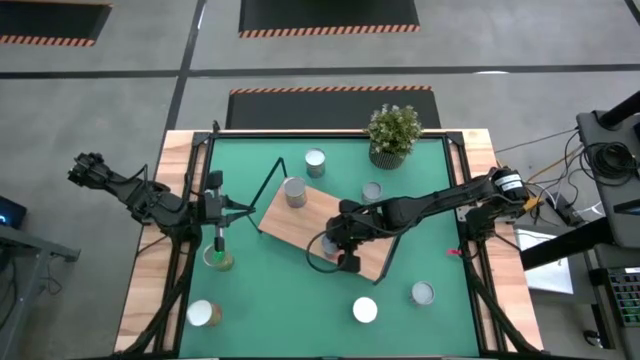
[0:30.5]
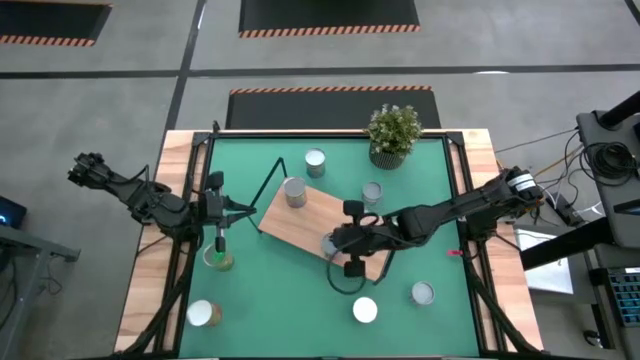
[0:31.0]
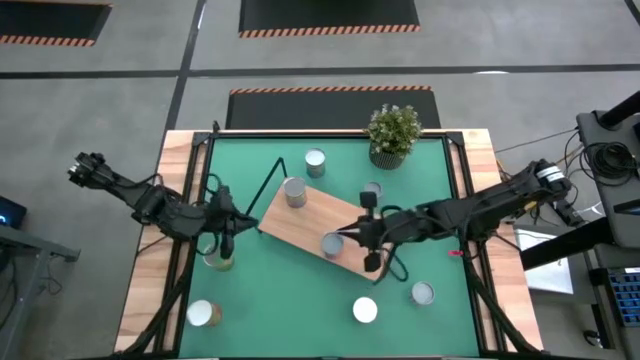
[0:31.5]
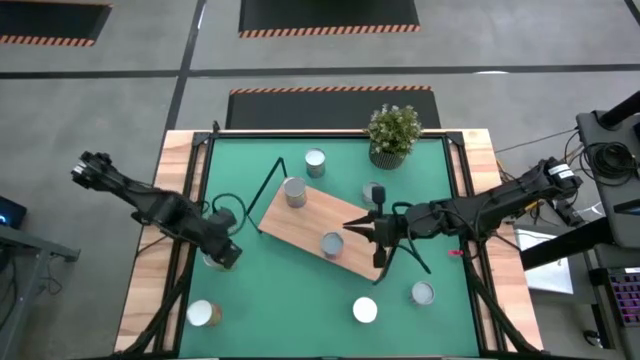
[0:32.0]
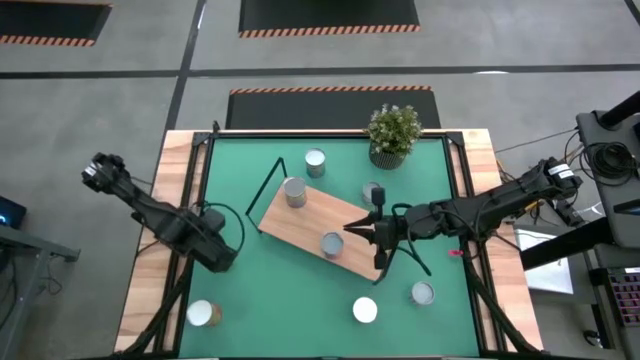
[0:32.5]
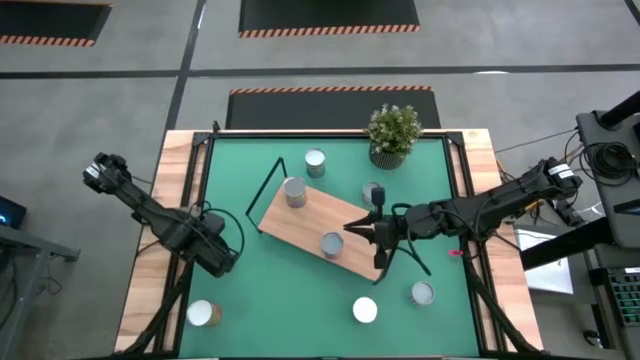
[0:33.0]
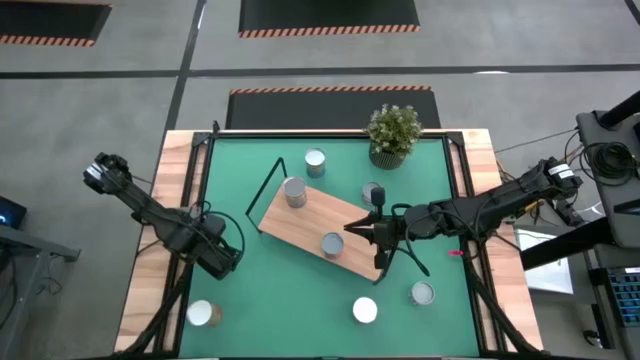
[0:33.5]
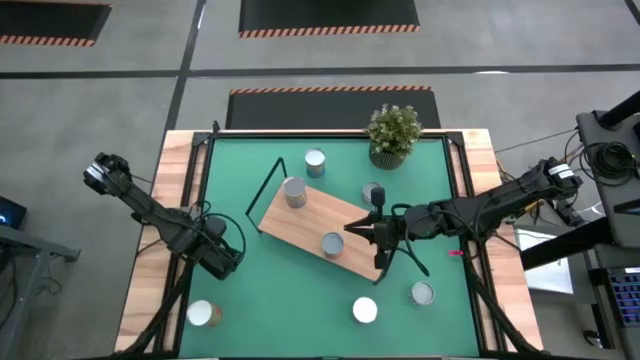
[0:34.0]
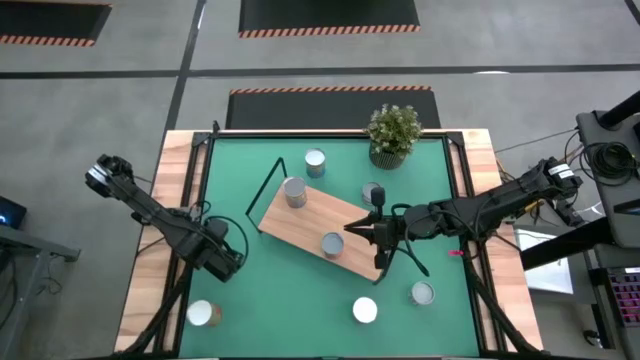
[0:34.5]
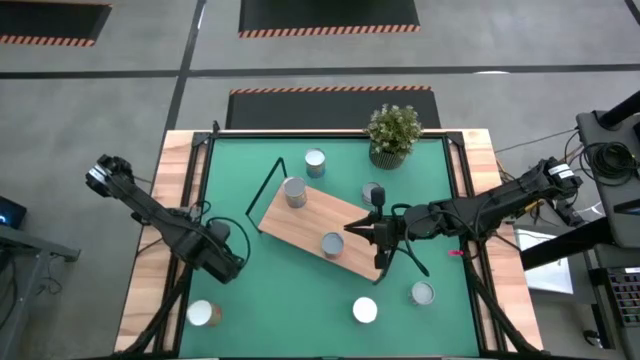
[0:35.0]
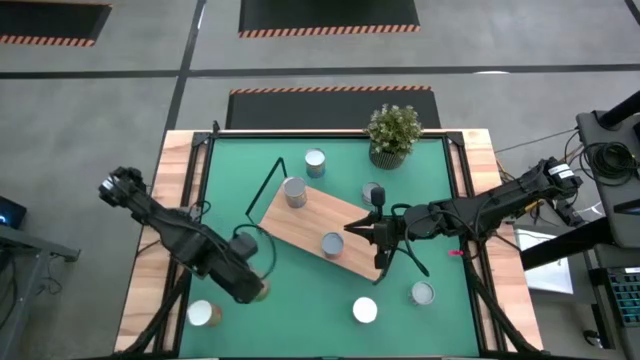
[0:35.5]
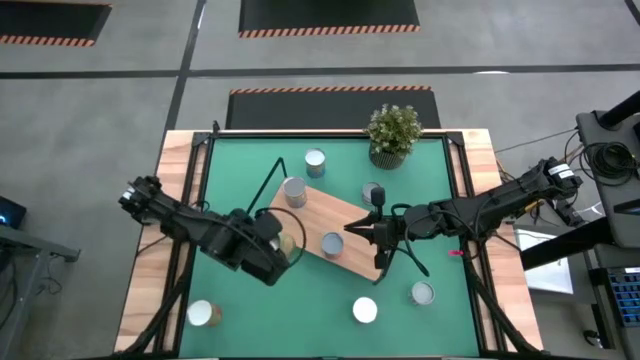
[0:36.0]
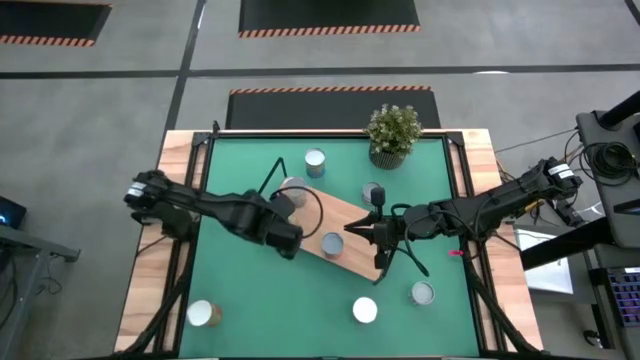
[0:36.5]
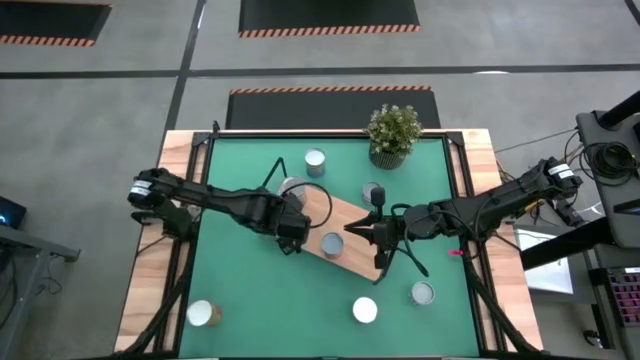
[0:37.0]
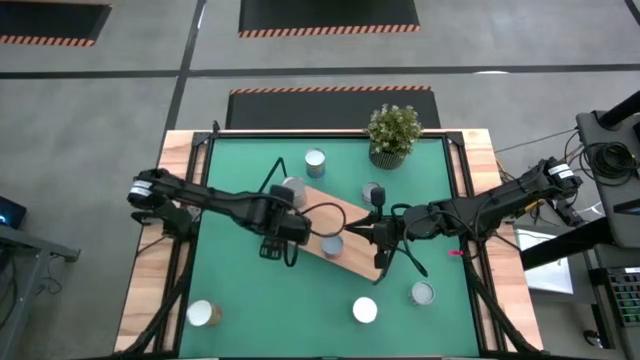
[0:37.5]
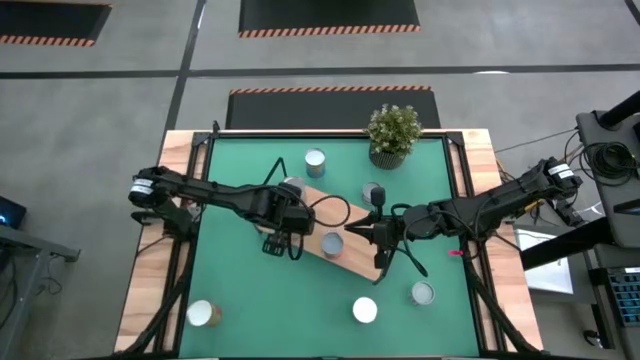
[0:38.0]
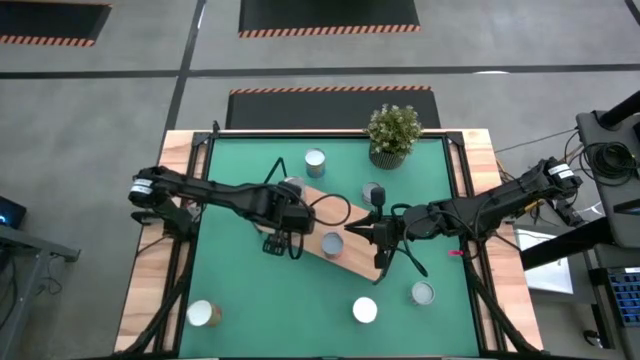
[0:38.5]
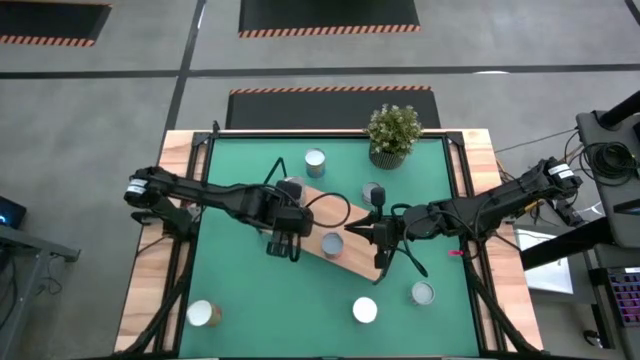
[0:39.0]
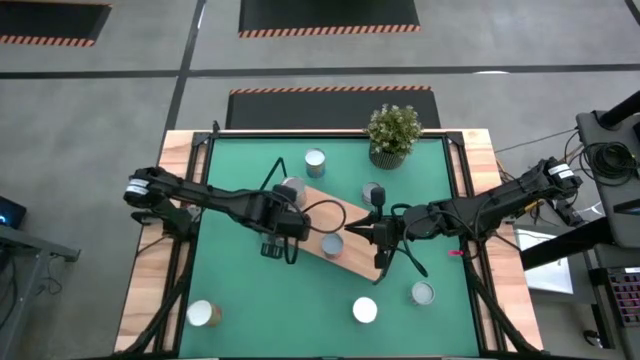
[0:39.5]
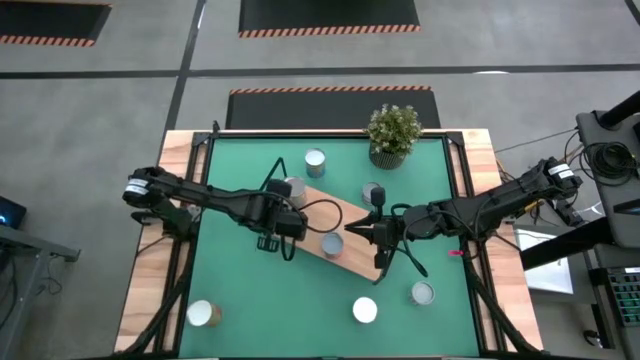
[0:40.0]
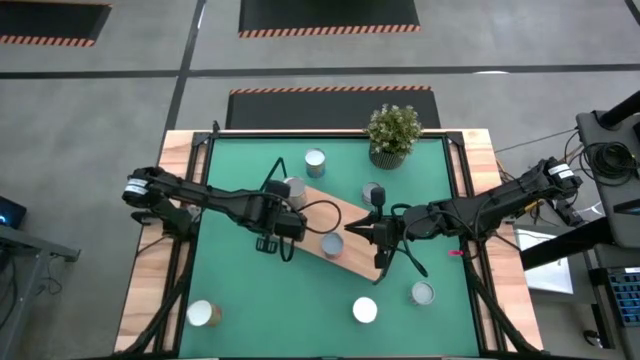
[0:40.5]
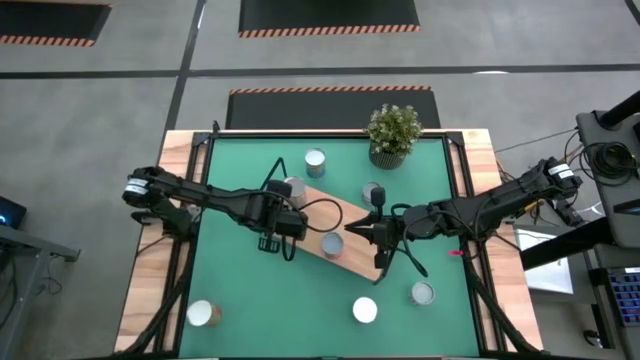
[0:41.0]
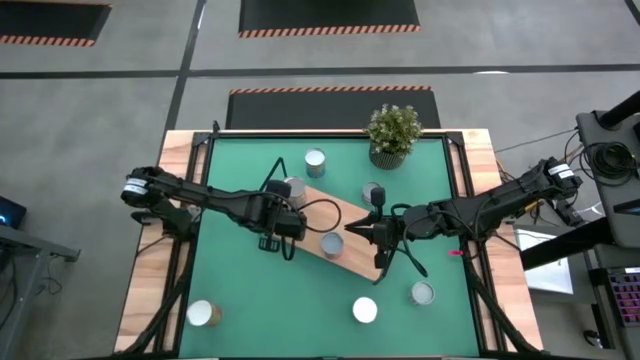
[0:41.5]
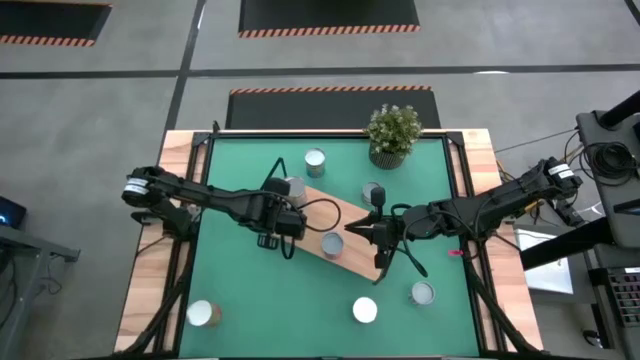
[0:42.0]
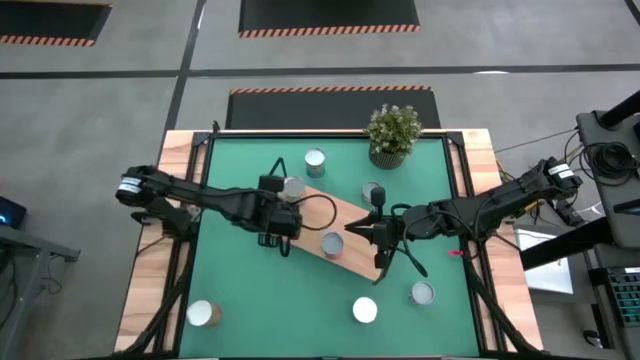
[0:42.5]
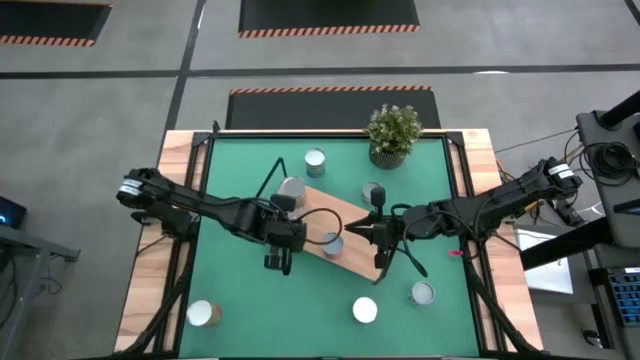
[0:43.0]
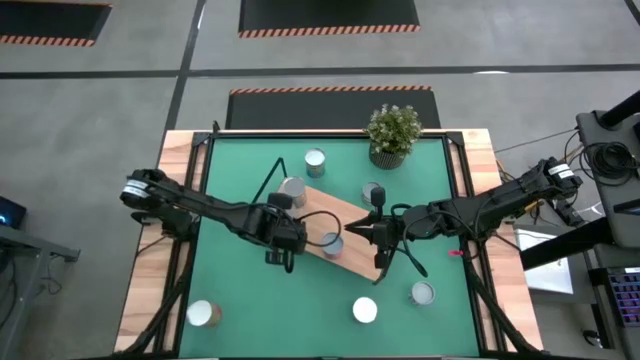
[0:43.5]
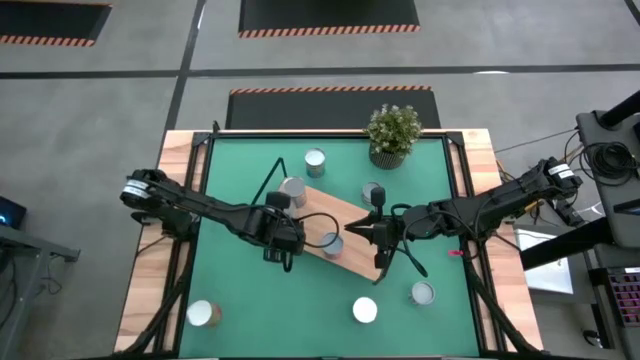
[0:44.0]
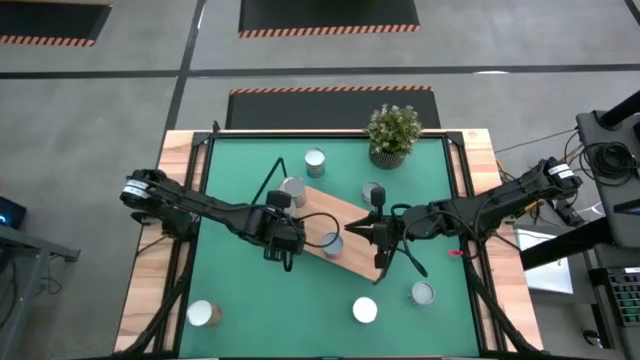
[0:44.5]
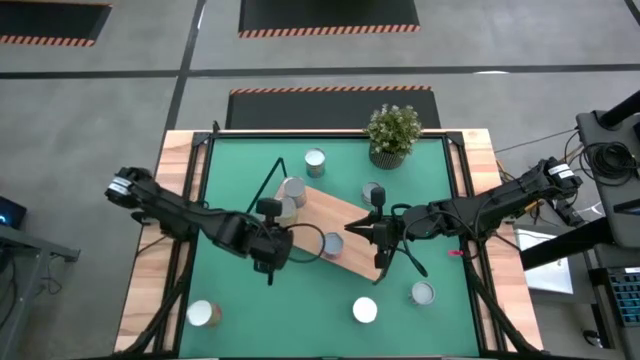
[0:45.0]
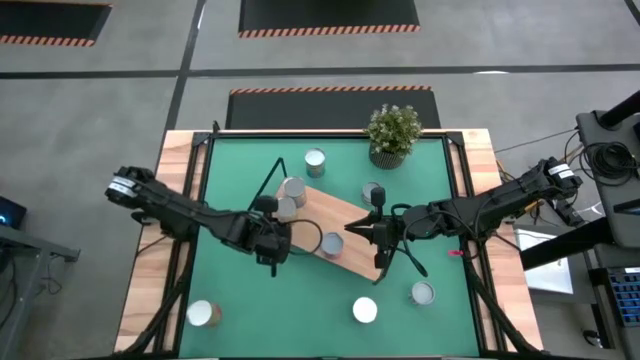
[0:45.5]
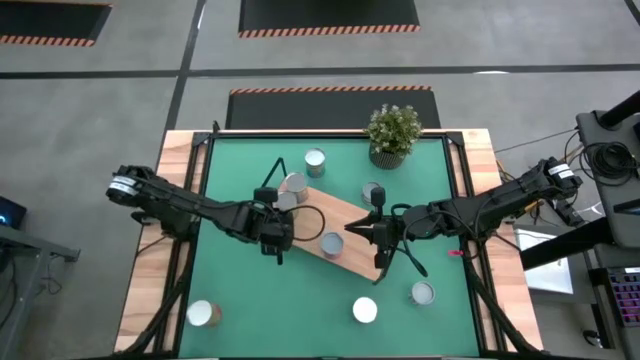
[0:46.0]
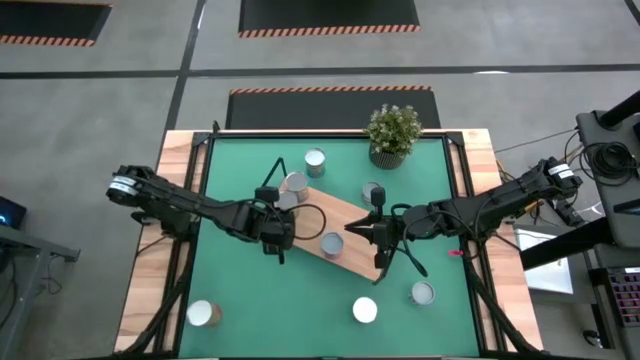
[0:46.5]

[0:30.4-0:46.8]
Task: Pick and place cans onto a shelf
Put the large canned oranges on the shelf

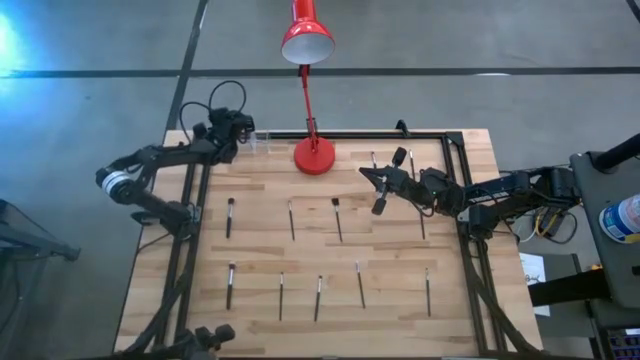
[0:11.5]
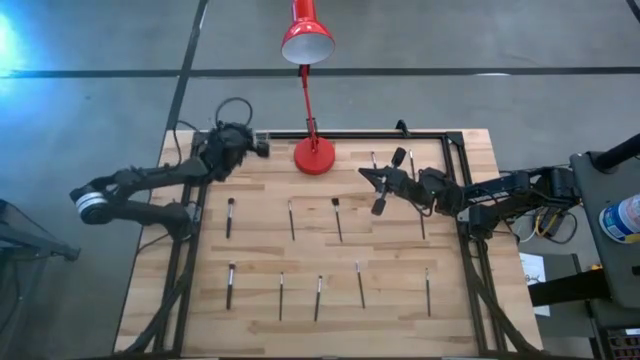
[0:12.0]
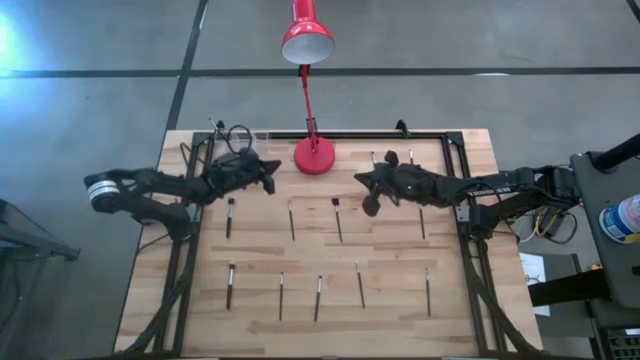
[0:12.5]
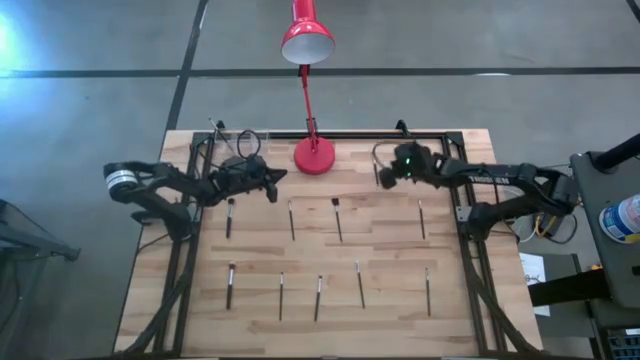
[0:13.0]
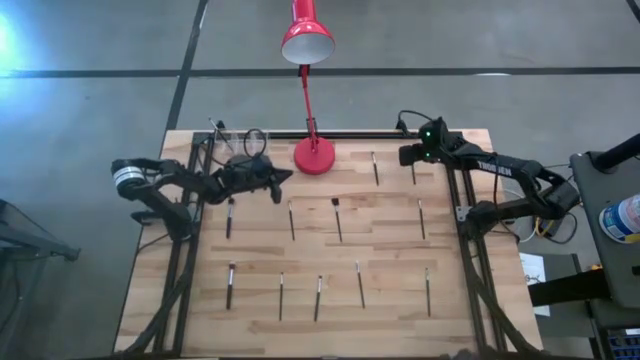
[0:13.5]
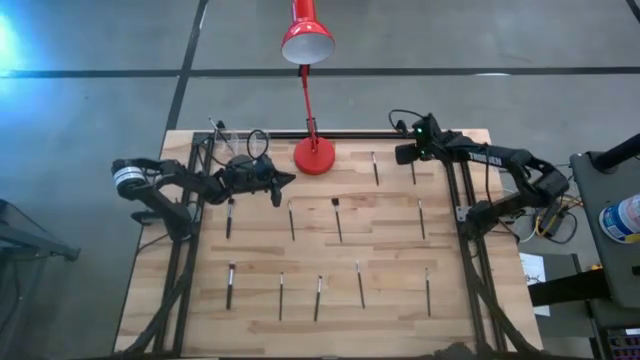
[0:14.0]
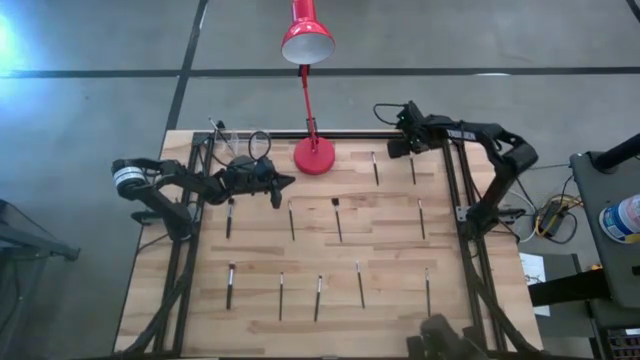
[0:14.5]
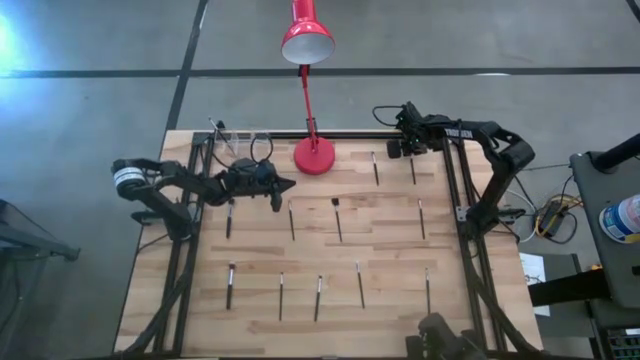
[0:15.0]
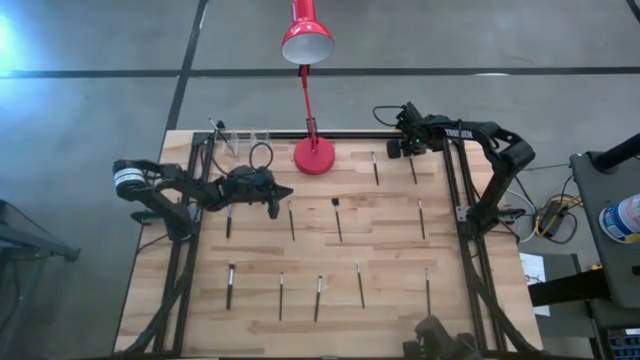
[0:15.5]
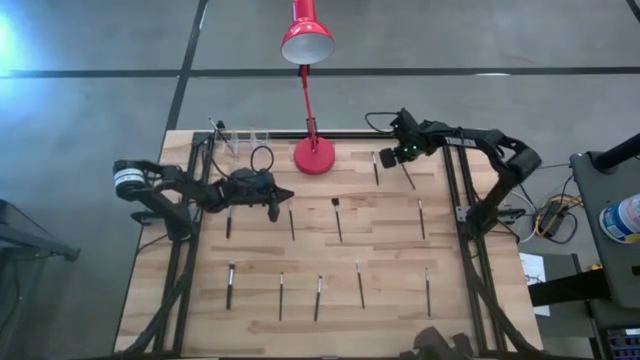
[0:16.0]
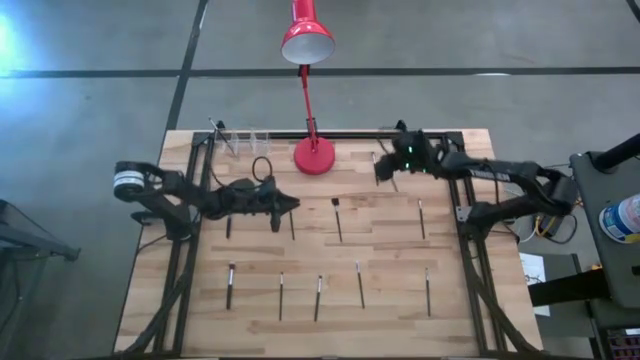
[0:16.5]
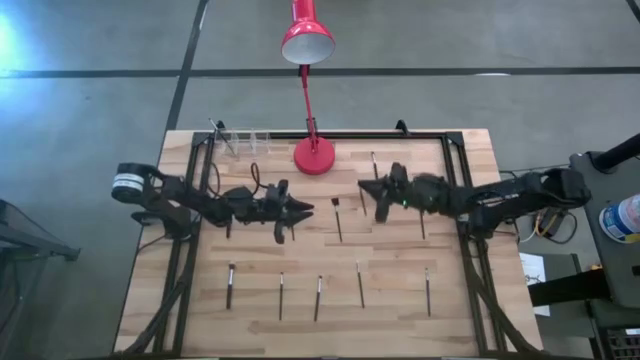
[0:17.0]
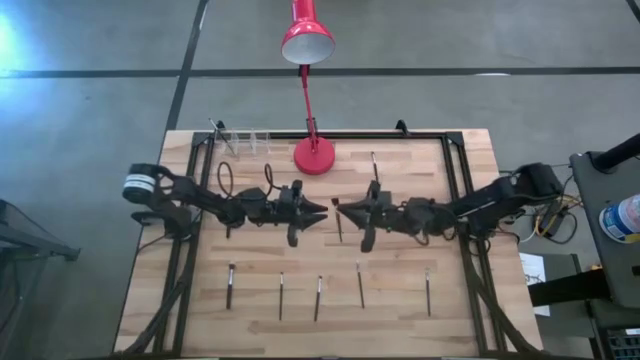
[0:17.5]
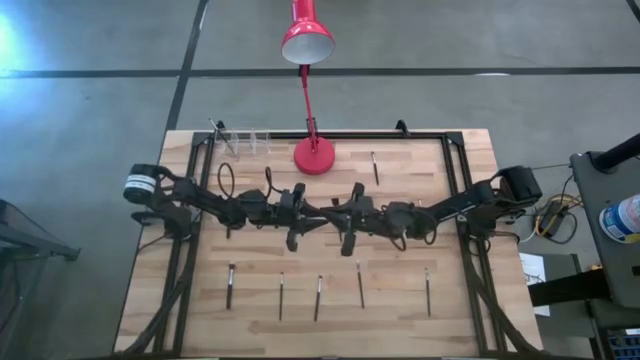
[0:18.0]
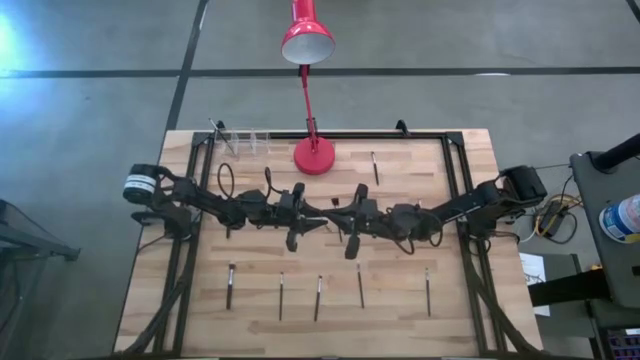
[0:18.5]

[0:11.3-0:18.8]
Task: Pick & Place Makeup Supplies
Put the makeup brush into the transparent organizer
